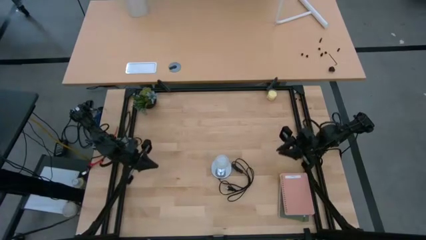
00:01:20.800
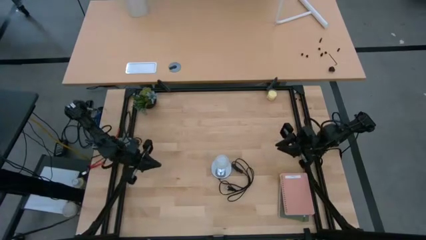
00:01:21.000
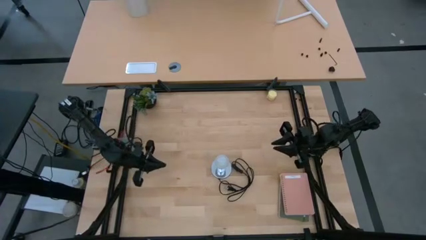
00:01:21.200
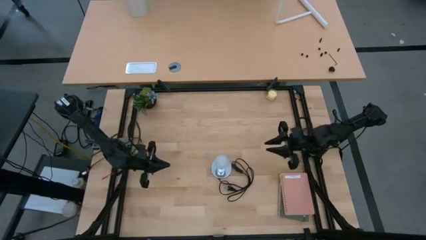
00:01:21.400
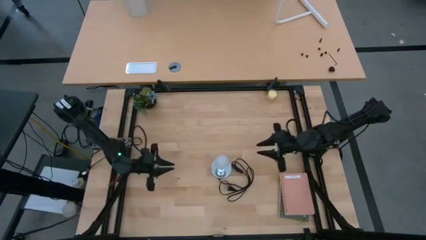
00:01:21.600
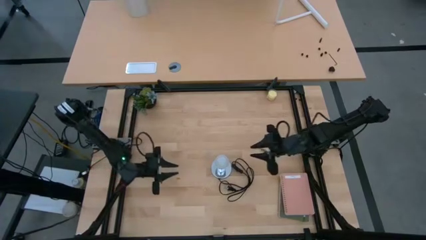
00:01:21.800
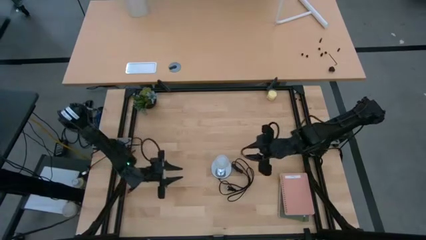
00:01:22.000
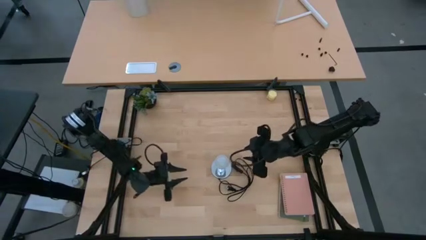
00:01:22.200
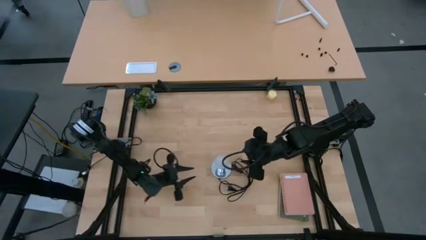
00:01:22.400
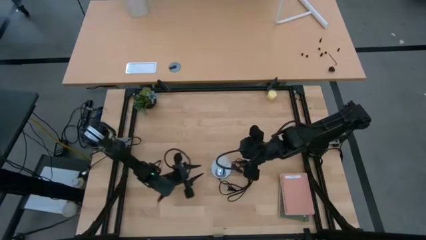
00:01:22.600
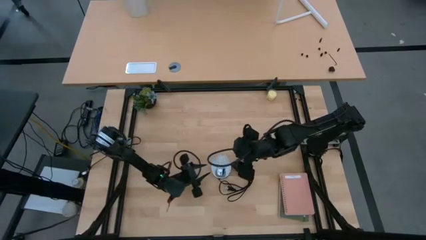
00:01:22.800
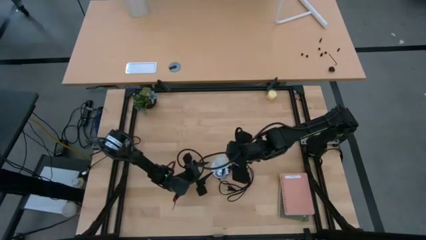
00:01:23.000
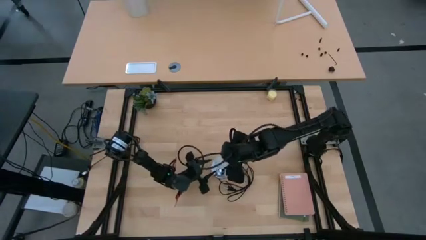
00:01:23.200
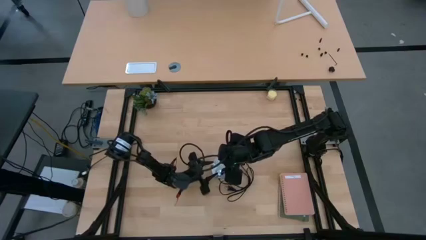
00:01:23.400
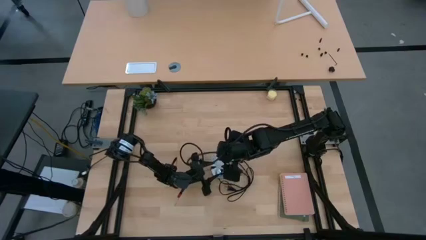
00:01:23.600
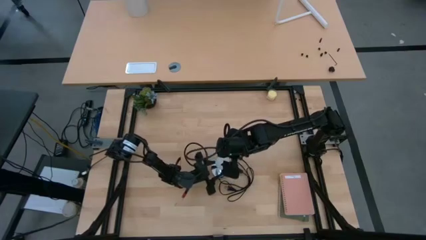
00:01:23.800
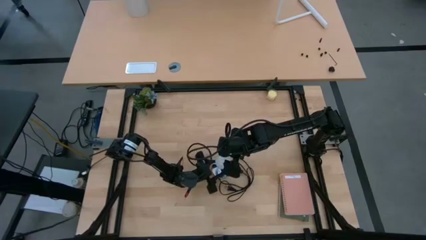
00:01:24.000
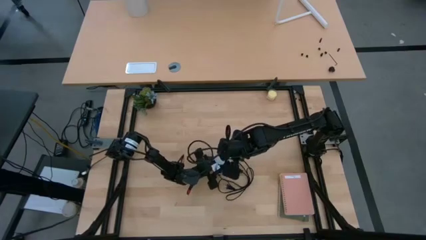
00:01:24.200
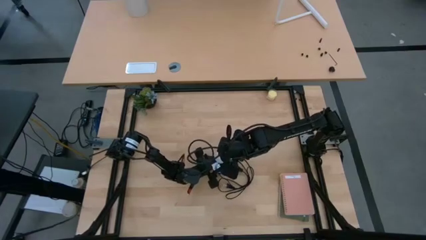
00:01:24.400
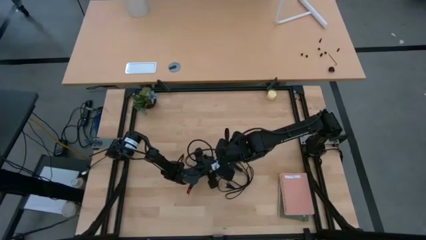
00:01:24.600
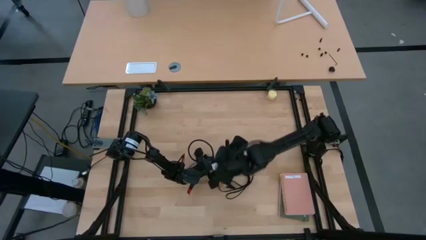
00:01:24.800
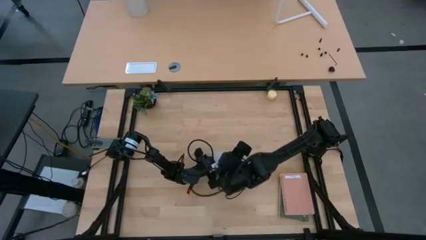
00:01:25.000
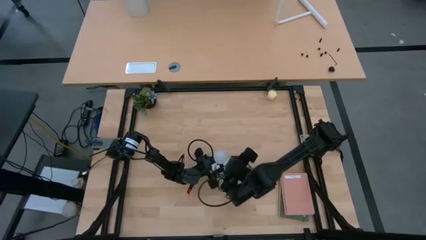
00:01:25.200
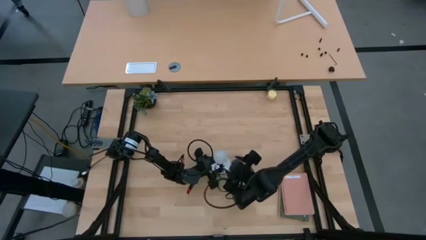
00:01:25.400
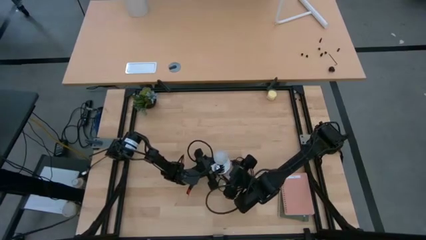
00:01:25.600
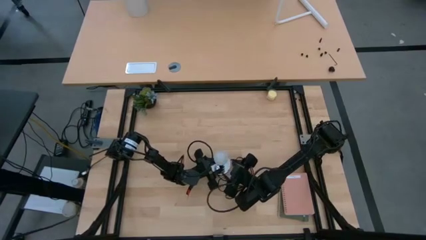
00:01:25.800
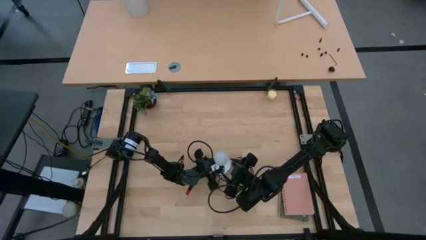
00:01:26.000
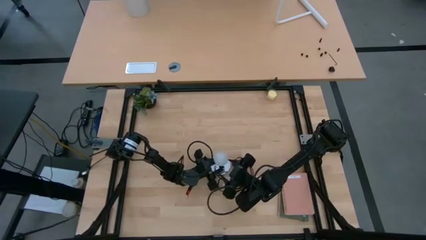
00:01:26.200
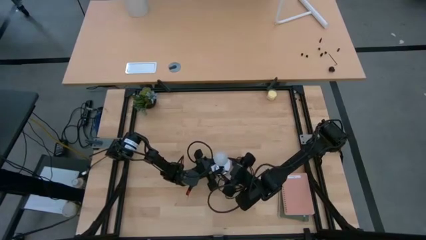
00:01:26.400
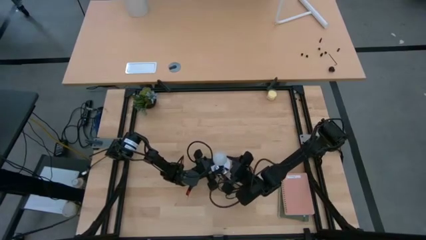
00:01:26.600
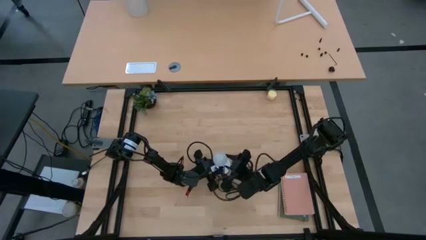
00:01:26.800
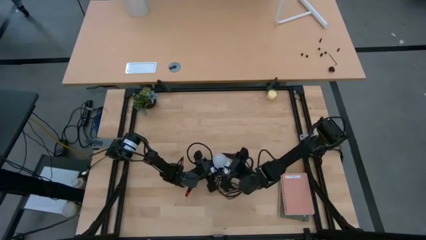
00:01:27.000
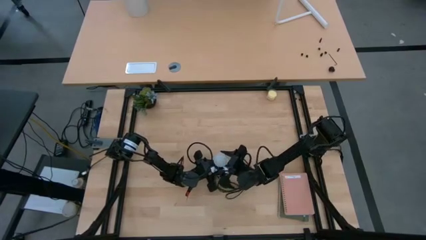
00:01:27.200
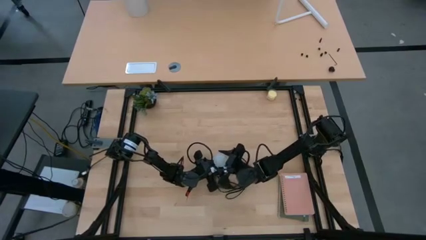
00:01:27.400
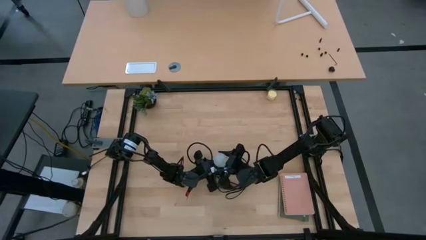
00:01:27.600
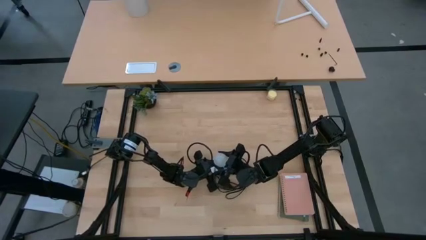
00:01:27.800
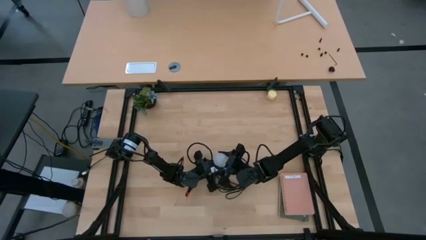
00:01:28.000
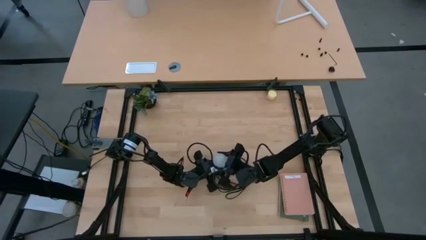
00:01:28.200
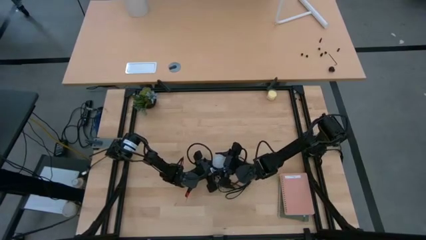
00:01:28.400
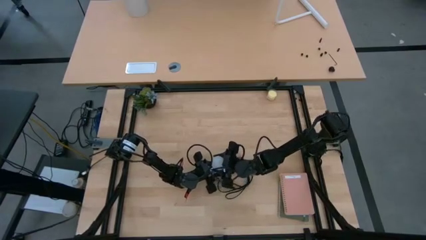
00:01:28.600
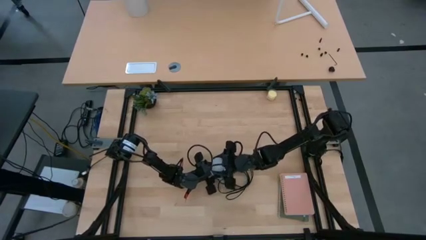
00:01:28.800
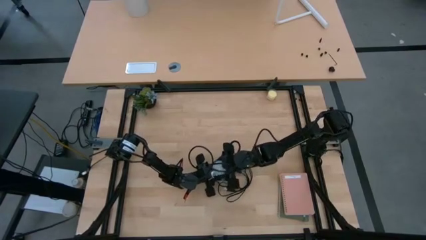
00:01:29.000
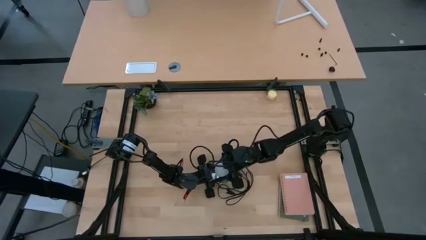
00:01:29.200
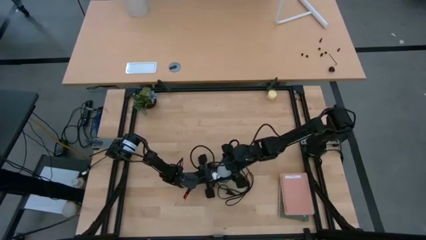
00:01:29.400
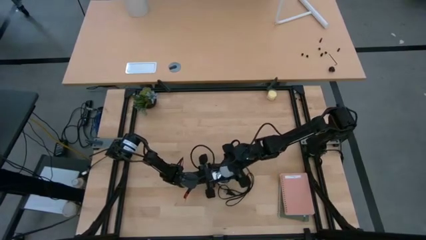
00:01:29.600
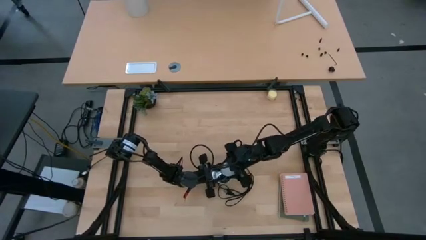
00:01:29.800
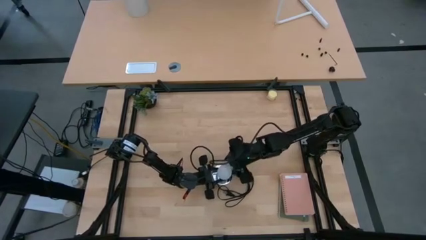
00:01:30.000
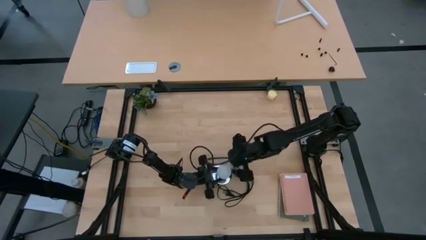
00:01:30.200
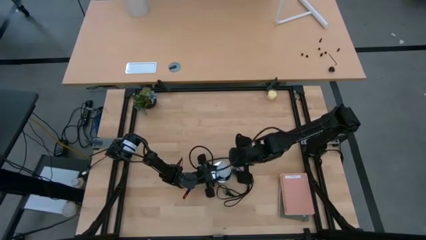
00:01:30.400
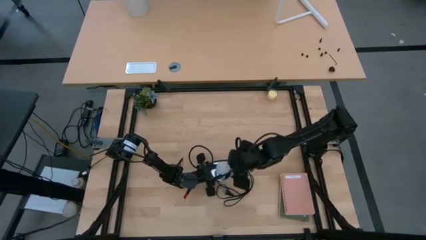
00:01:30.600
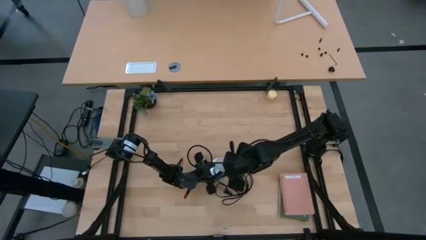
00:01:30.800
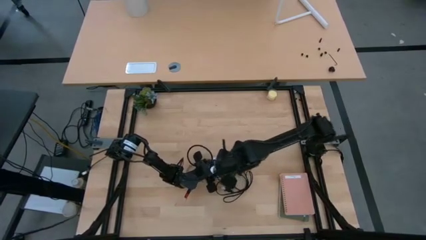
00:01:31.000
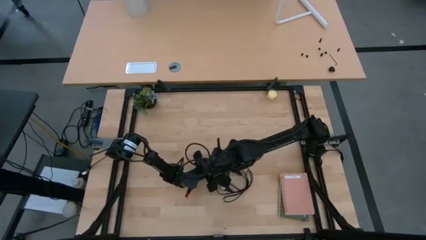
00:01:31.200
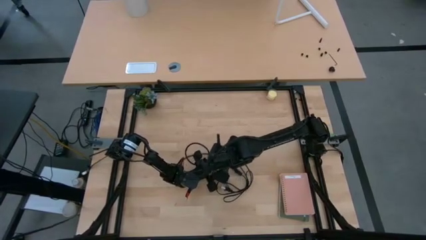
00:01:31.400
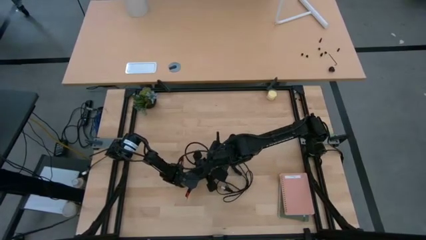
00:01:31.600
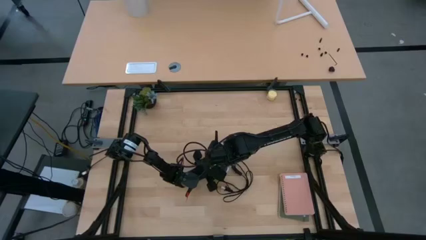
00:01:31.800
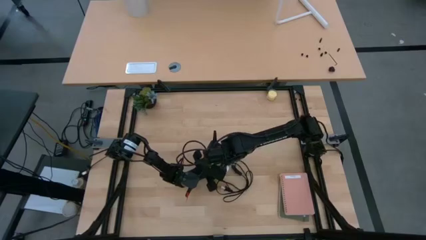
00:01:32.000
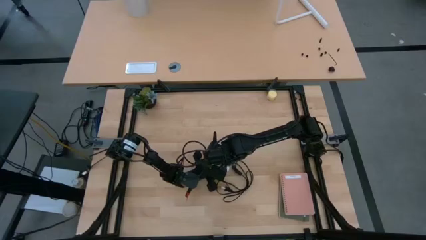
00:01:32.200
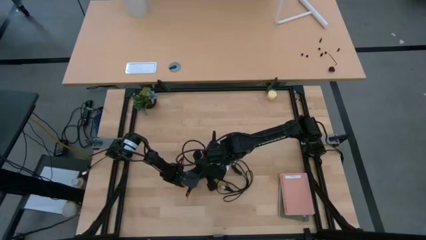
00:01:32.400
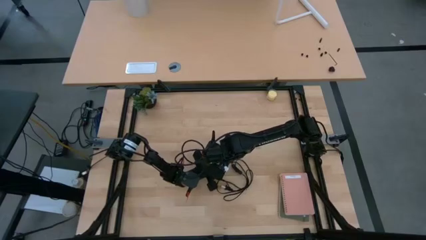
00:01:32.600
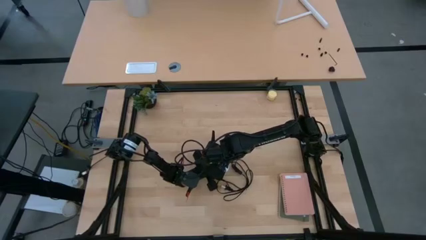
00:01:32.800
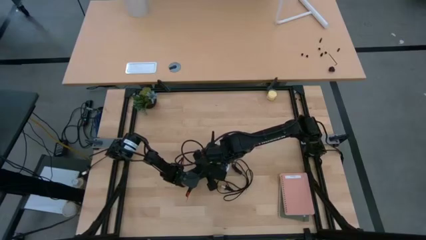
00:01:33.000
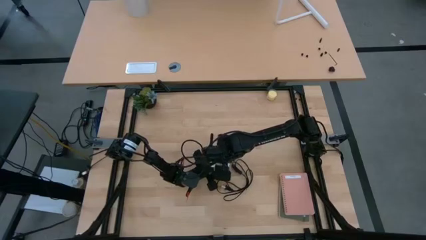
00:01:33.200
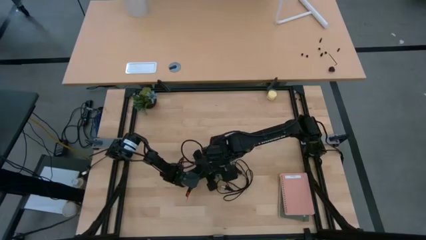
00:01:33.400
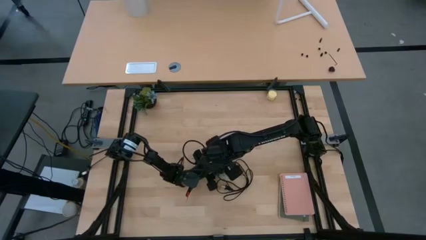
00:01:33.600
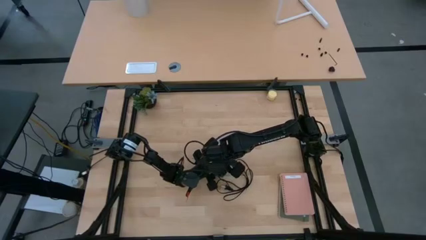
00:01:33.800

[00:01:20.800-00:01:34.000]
Task: Screw lightbulb
Remove the white lightbulb from the silver lamp
